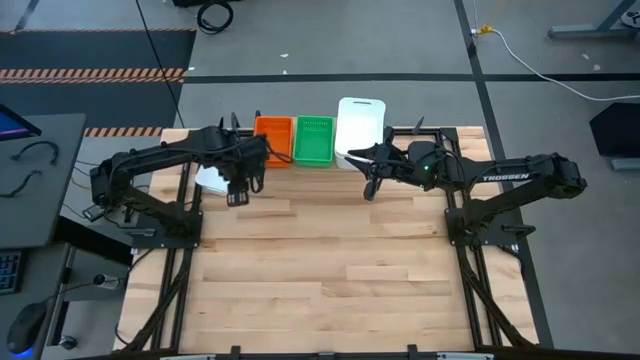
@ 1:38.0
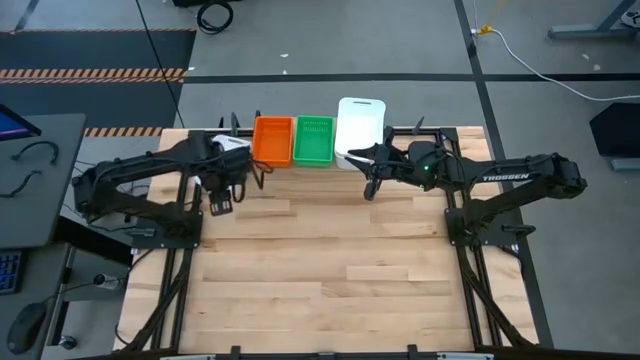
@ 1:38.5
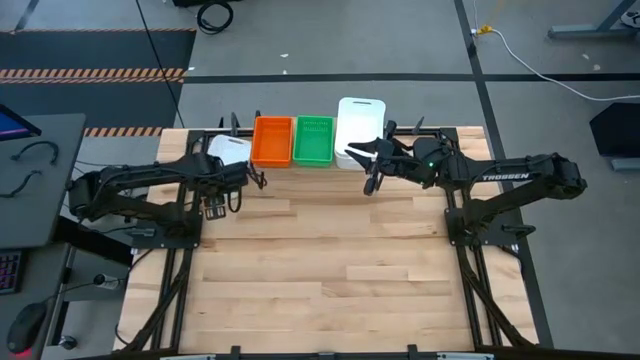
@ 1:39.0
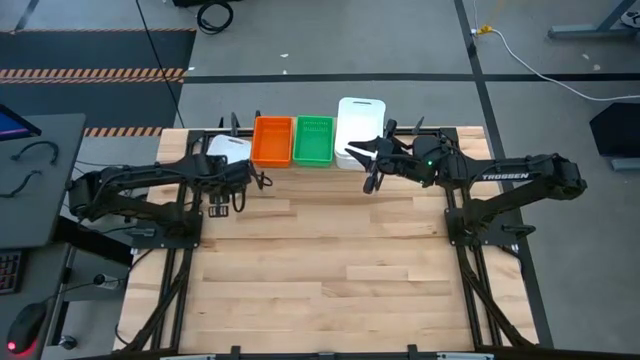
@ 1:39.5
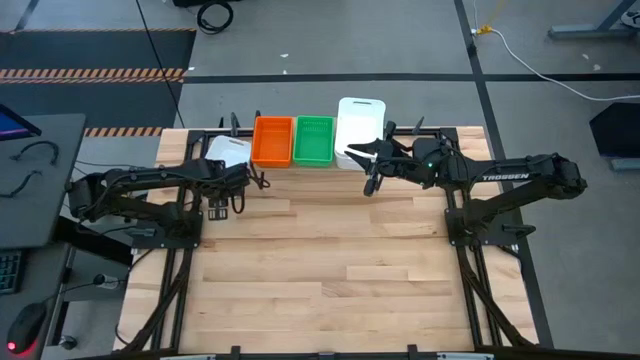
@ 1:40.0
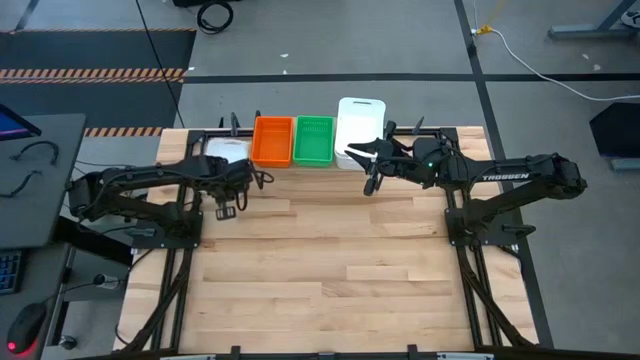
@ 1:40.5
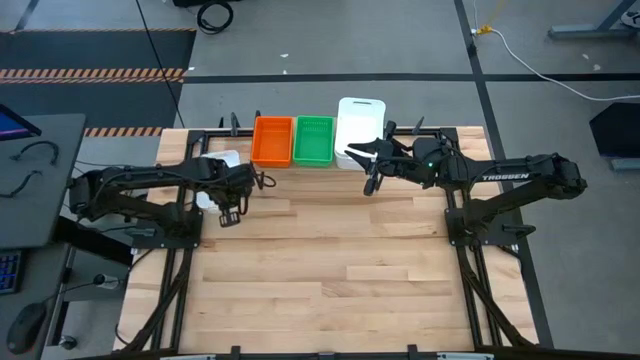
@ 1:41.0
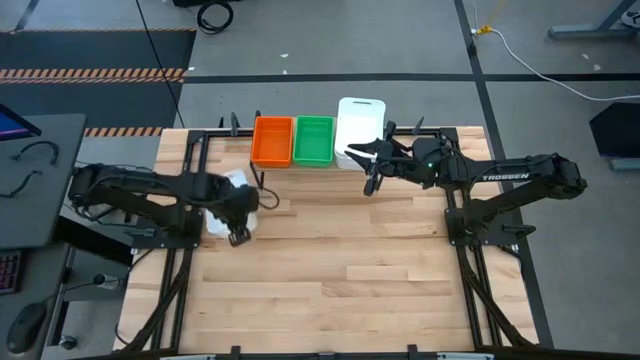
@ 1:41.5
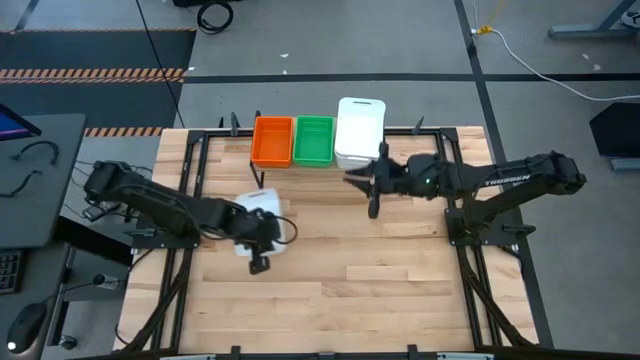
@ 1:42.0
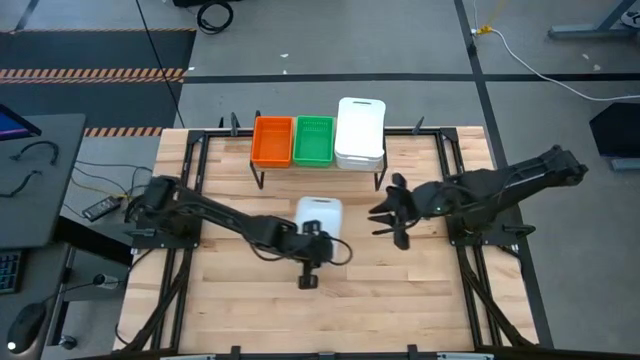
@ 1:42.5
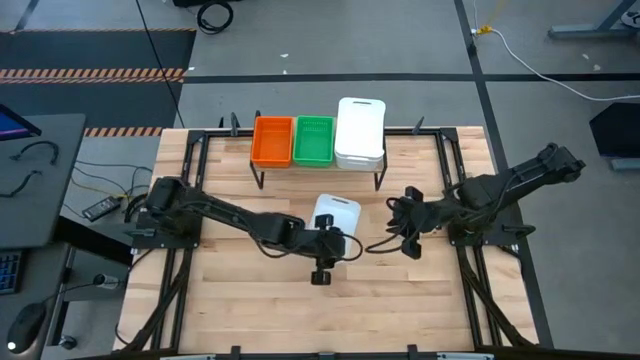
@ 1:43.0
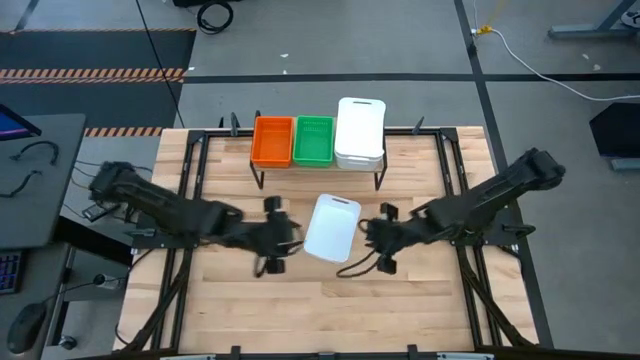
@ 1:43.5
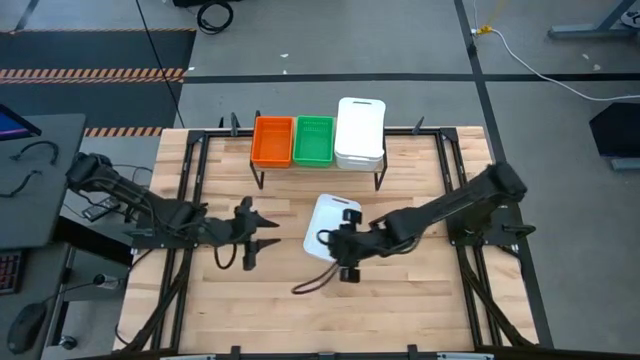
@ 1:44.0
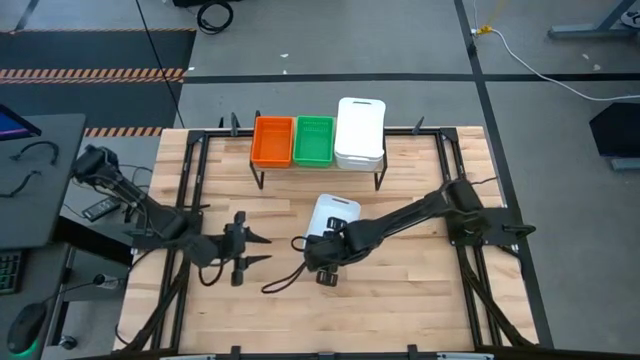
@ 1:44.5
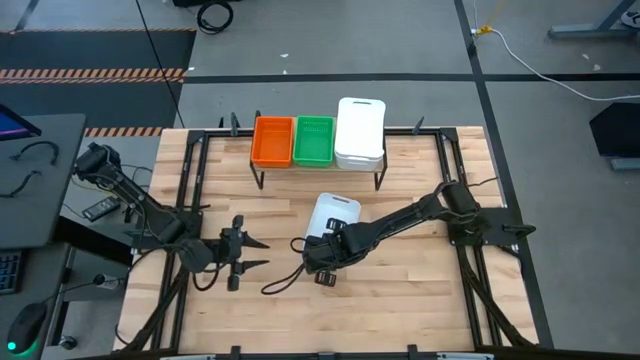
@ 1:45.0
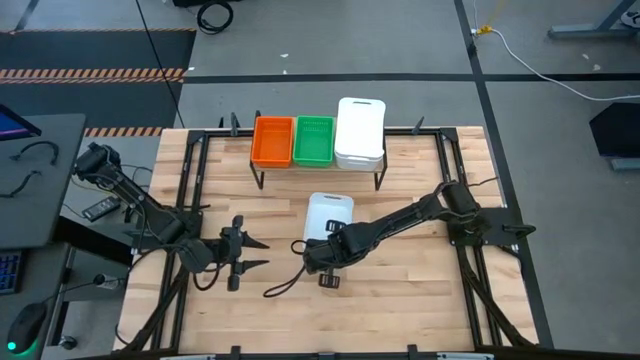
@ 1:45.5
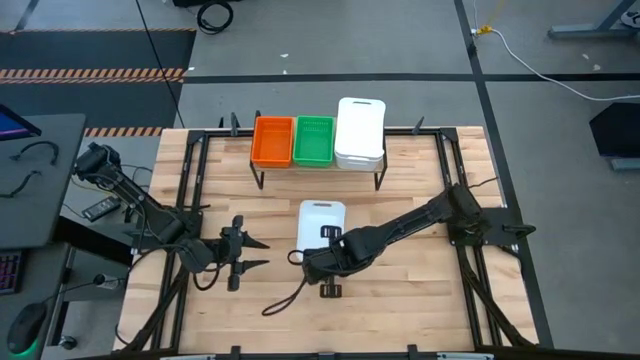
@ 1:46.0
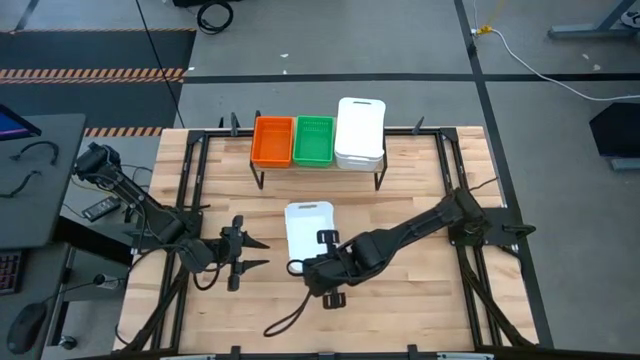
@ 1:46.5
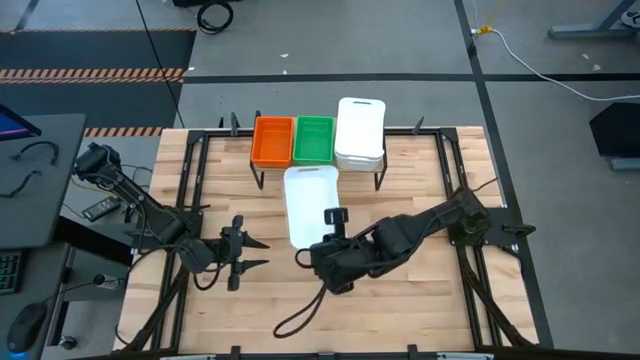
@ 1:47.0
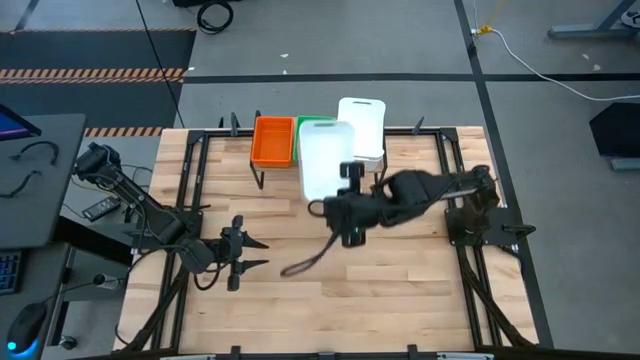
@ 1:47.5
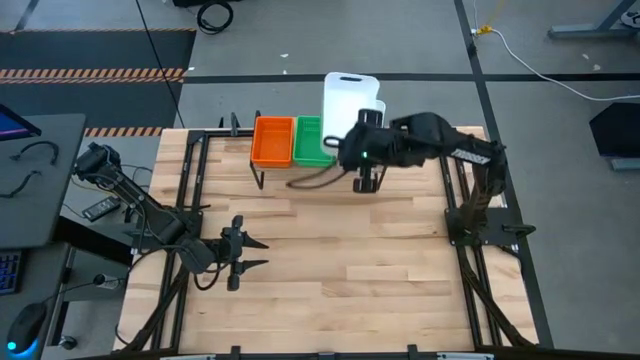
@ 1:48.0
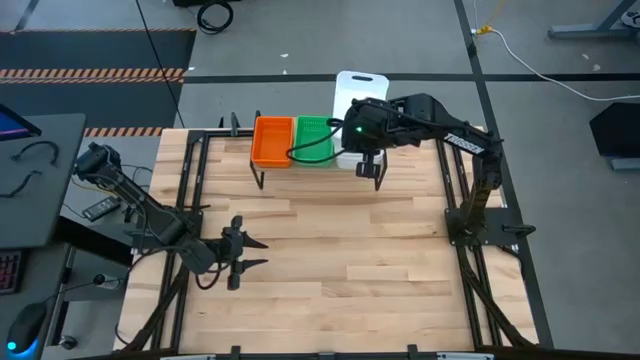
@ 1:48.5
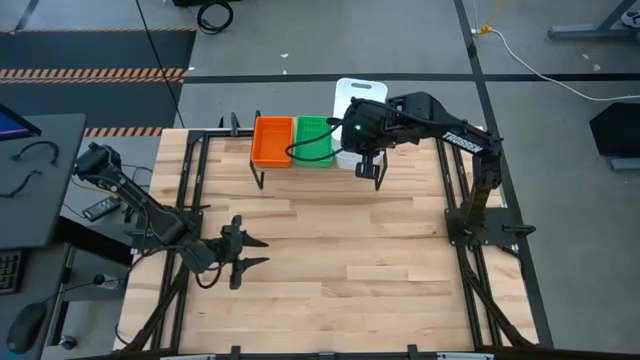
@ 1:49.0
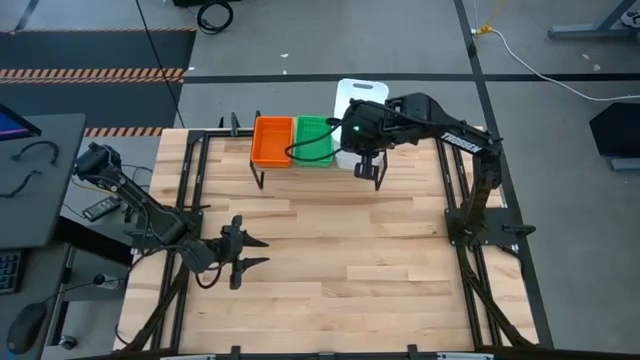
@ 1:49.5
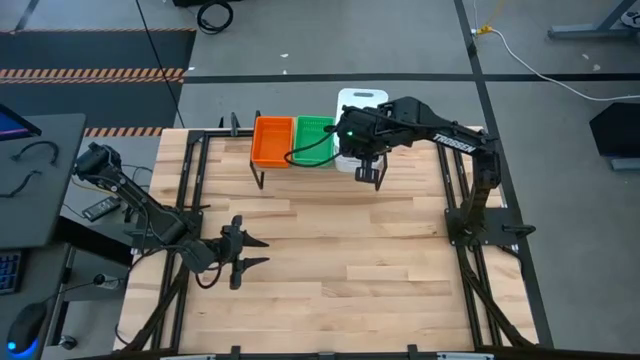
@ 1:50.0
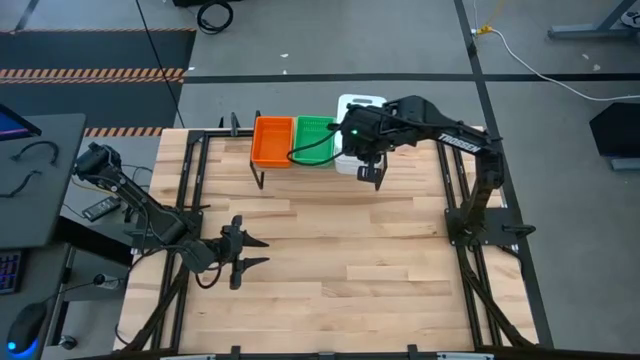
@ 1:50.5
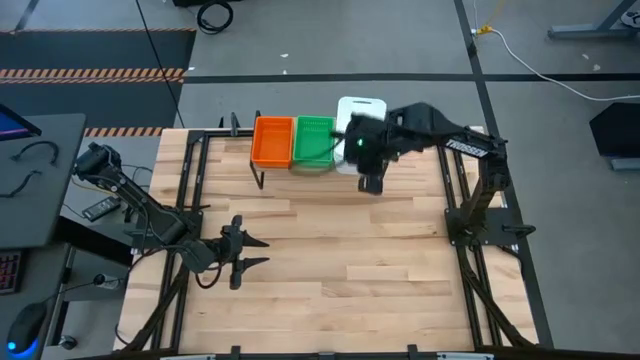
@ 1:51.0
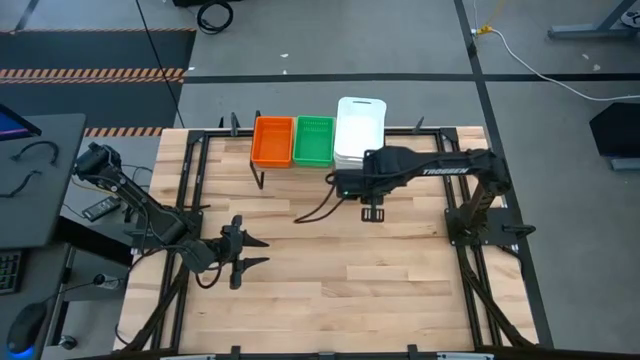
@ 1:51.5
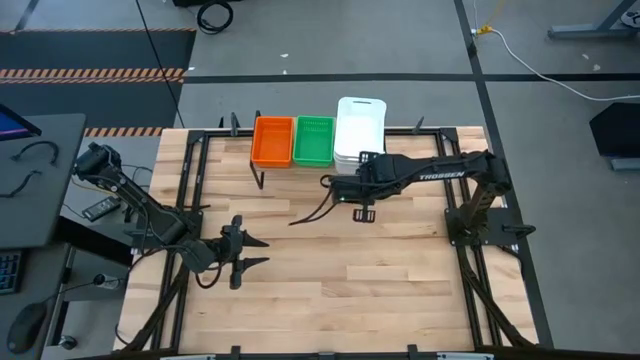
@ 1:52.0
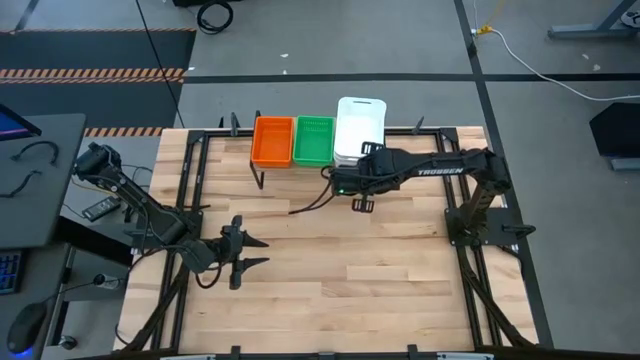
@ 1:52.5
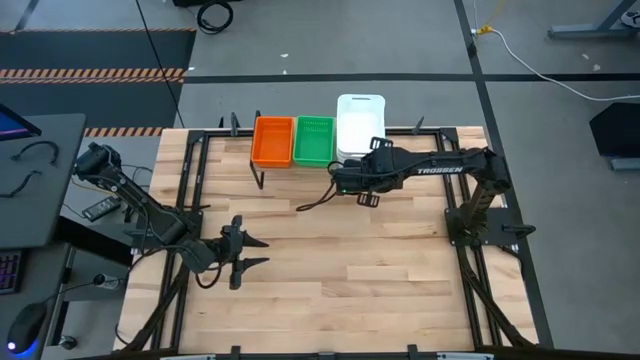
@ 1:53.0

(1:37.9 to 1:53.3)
Task: Stack baskets on shelf by color
Stack the white bin on top of the stacked white bins on the shelf

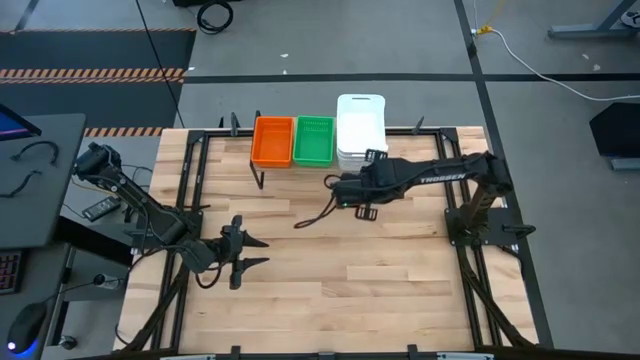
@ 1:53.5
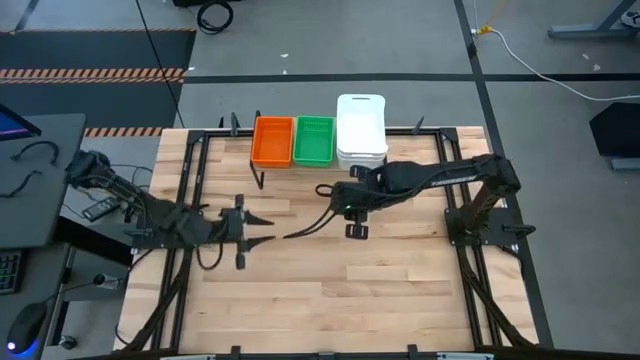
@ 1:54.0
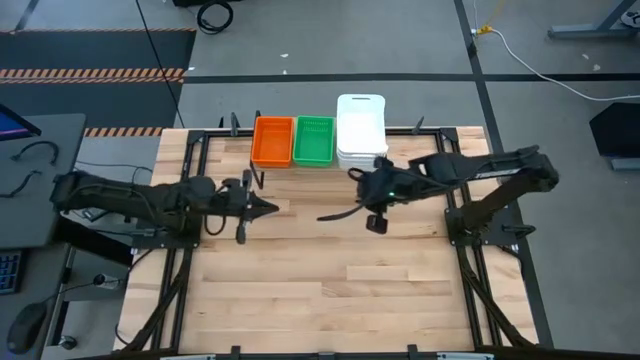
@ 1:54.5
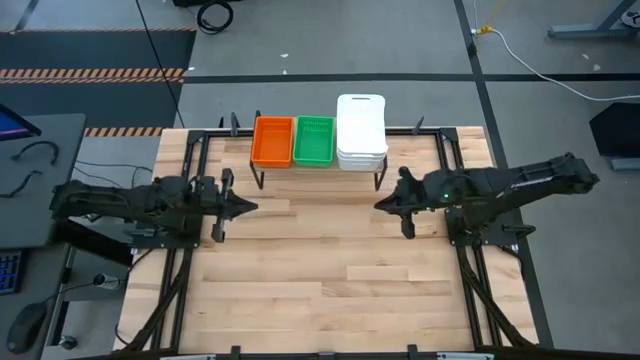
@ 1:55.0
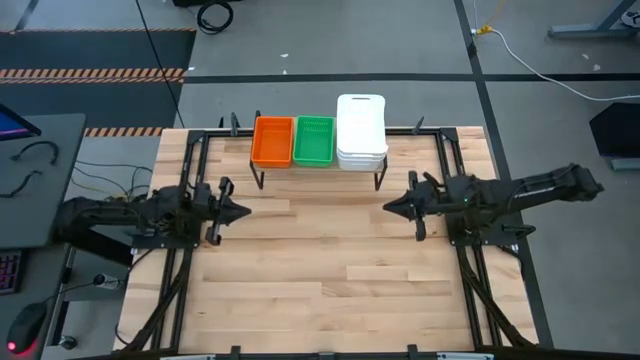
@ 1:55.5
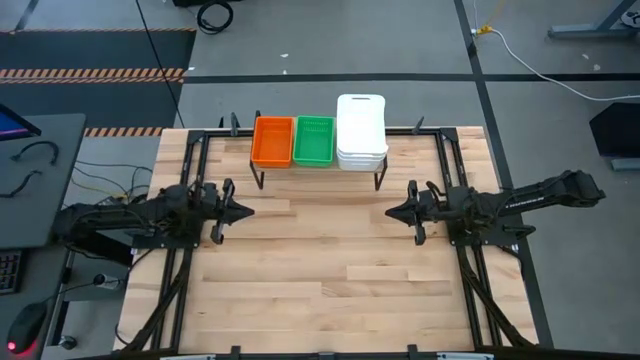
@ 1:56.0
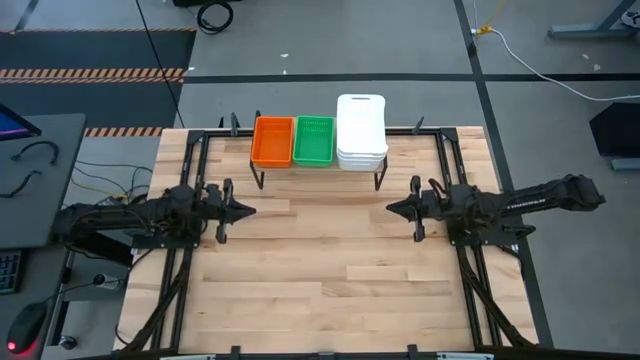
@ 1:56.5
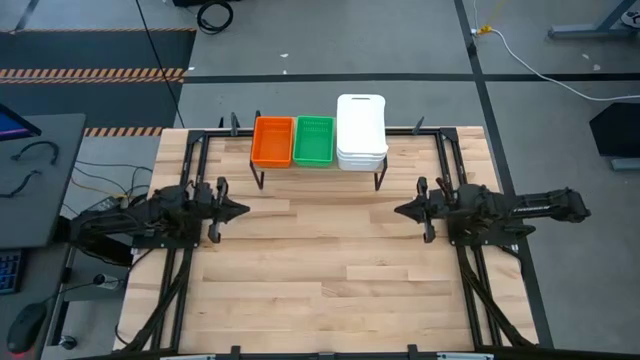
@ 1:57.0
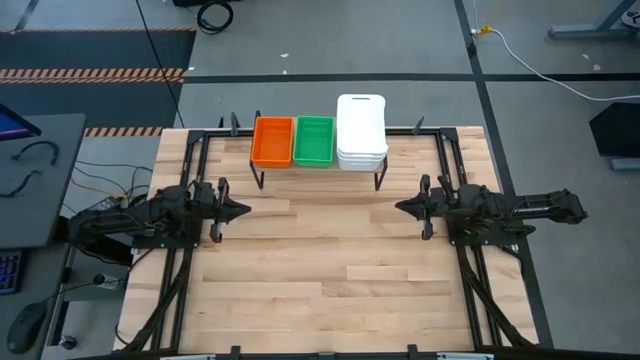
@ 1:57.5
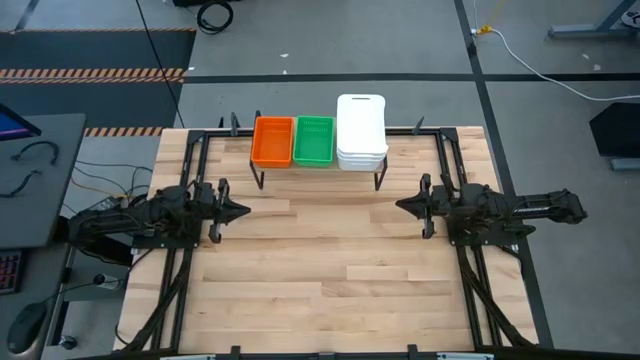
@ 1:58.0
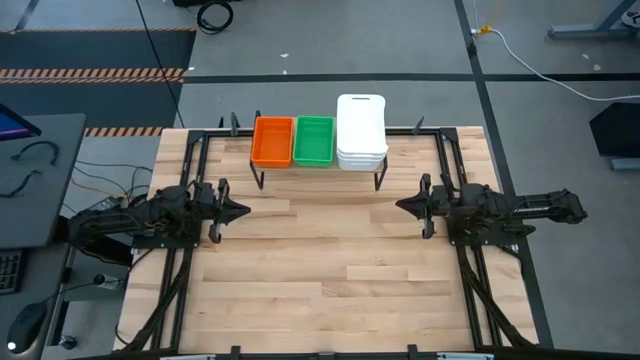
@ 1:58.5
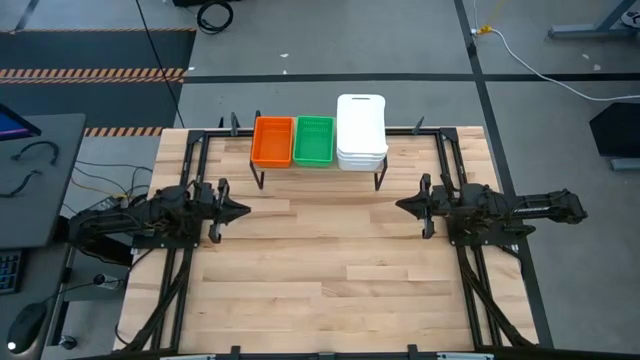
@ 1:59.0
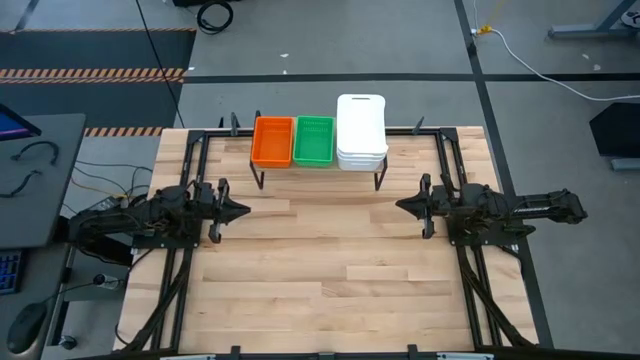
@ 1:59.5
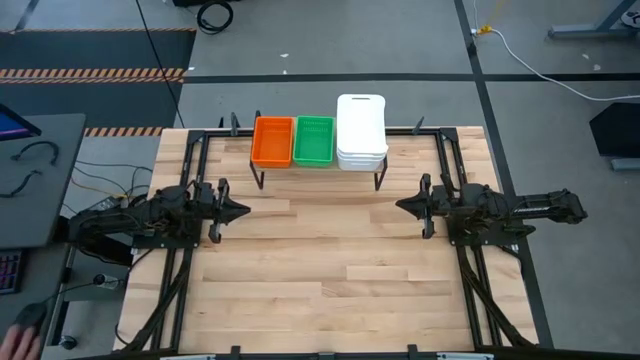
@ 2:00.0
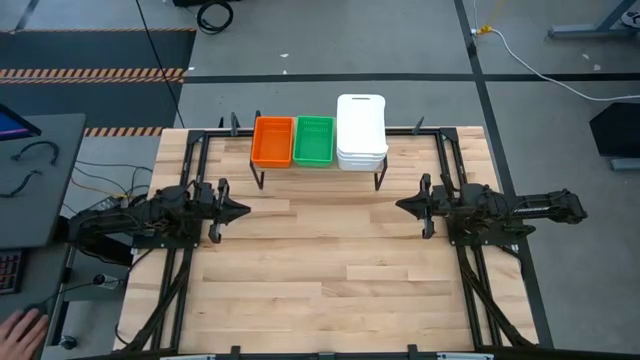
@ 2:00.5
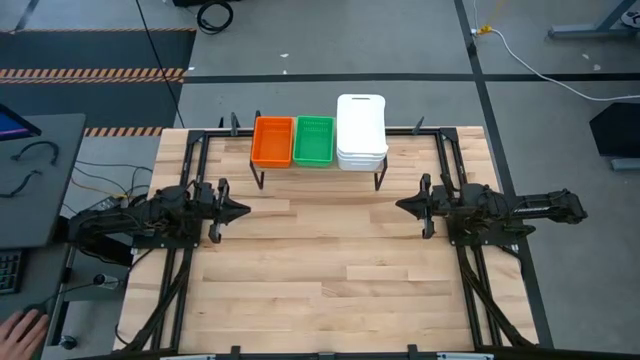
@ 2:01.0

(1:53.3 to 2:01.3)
Return to Home Position
